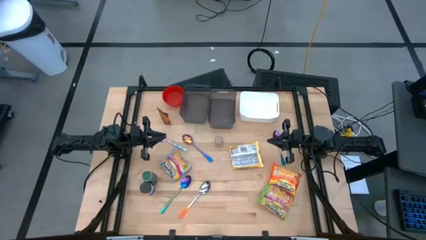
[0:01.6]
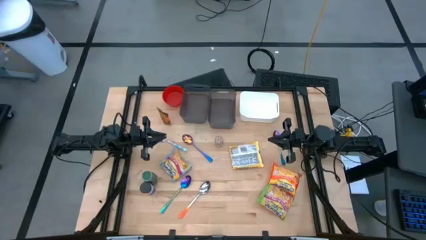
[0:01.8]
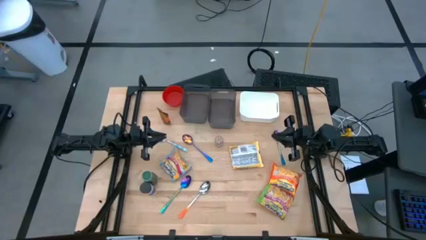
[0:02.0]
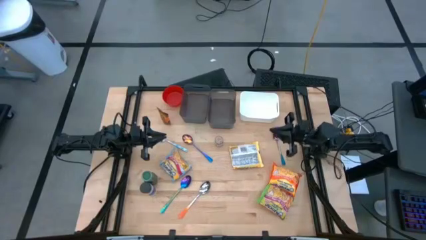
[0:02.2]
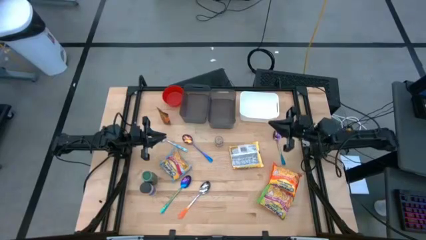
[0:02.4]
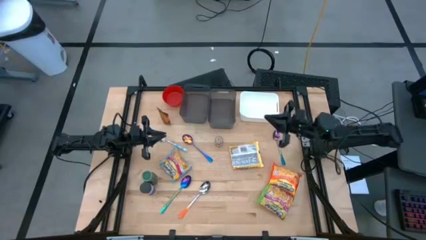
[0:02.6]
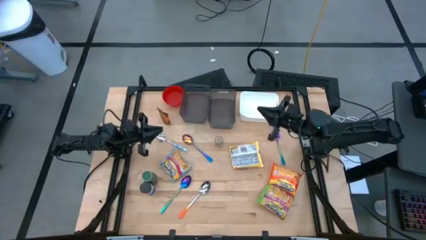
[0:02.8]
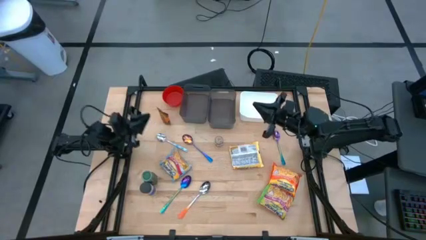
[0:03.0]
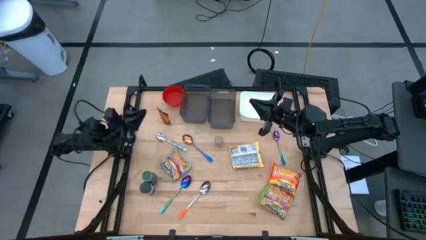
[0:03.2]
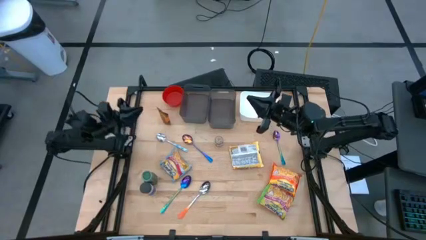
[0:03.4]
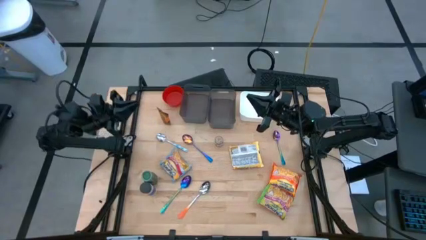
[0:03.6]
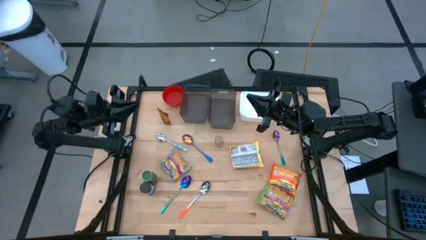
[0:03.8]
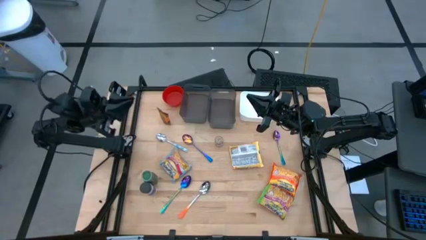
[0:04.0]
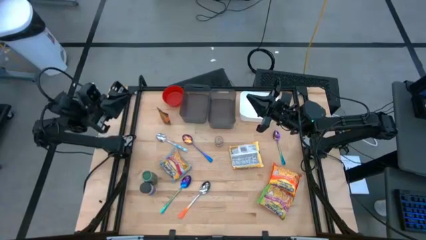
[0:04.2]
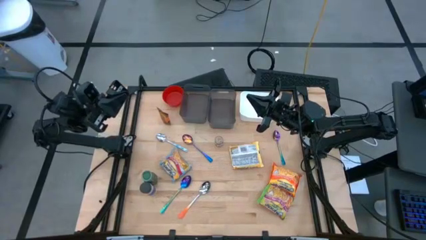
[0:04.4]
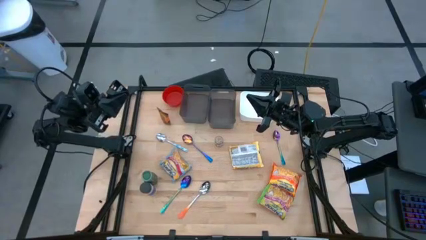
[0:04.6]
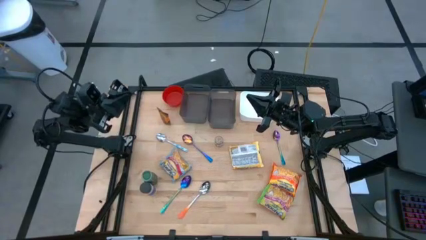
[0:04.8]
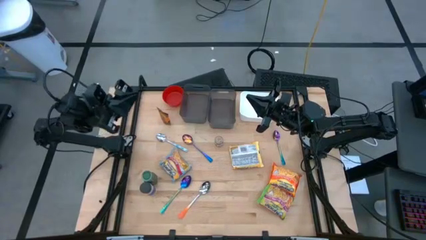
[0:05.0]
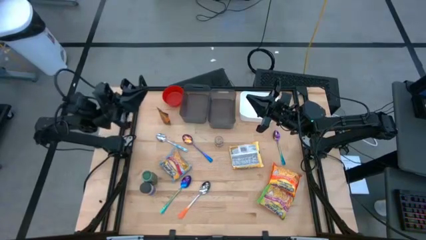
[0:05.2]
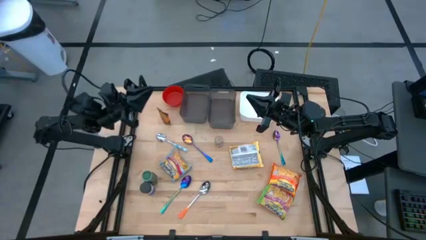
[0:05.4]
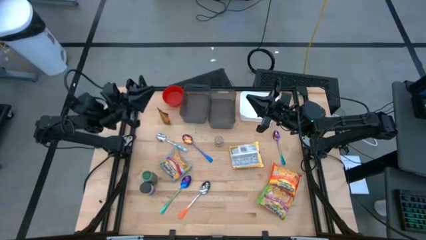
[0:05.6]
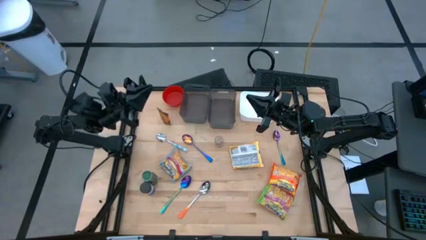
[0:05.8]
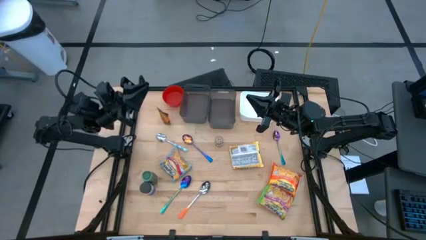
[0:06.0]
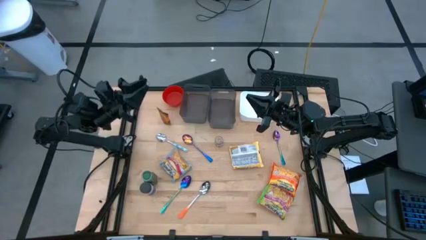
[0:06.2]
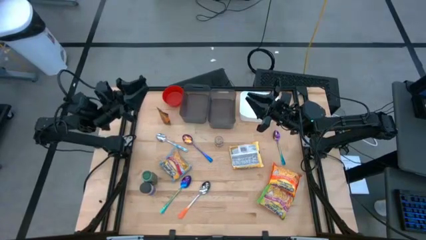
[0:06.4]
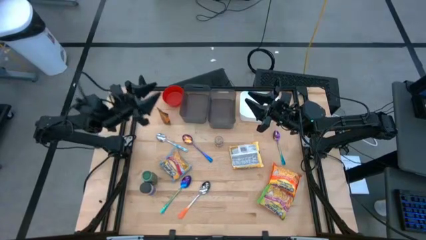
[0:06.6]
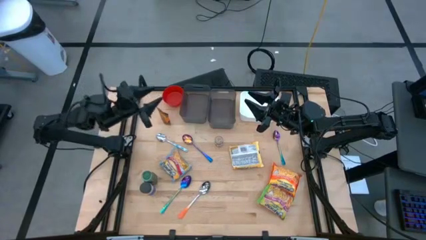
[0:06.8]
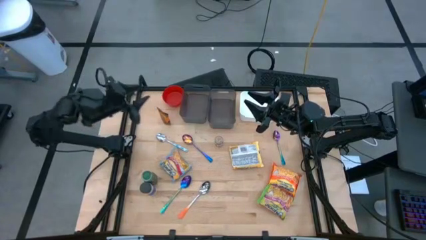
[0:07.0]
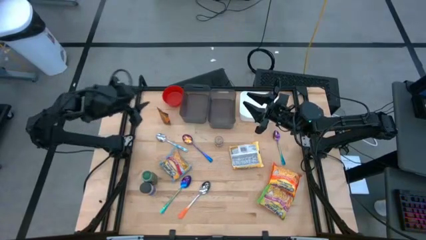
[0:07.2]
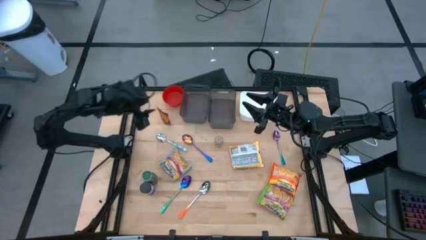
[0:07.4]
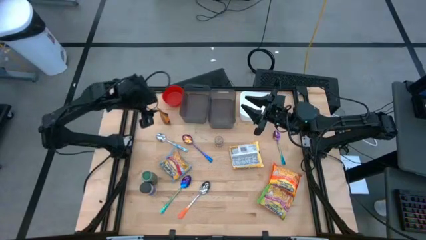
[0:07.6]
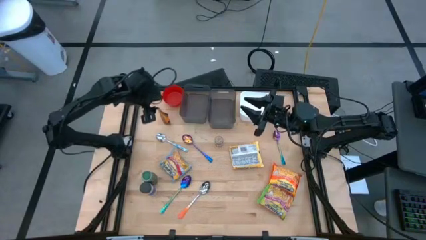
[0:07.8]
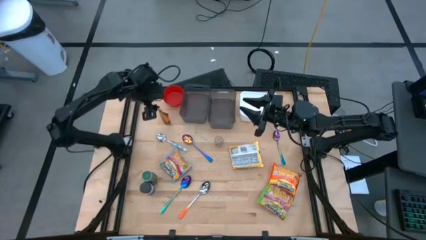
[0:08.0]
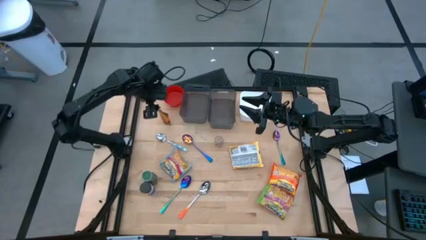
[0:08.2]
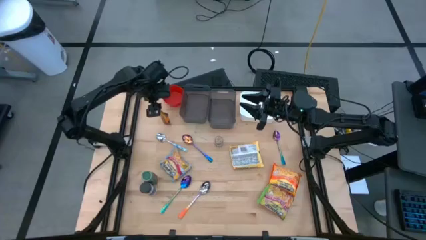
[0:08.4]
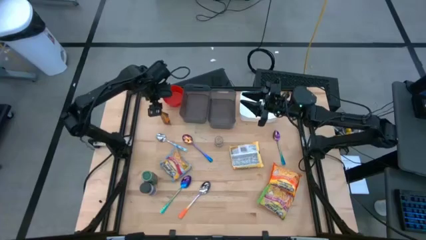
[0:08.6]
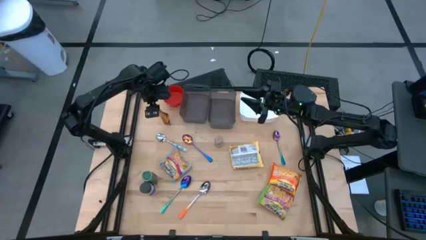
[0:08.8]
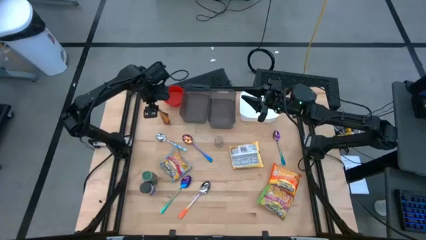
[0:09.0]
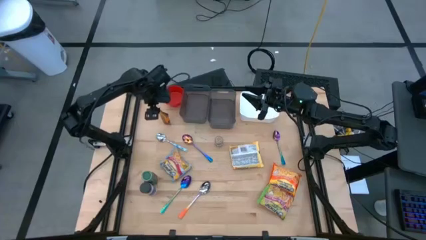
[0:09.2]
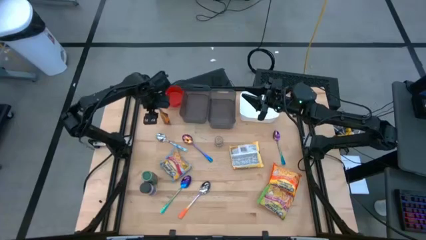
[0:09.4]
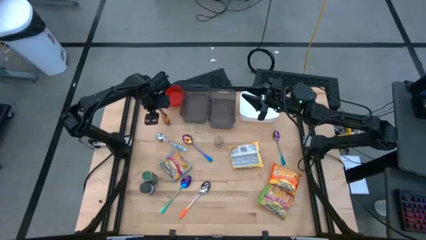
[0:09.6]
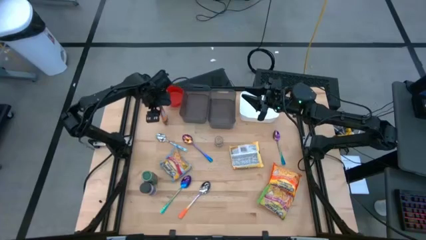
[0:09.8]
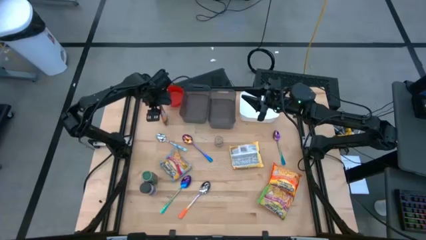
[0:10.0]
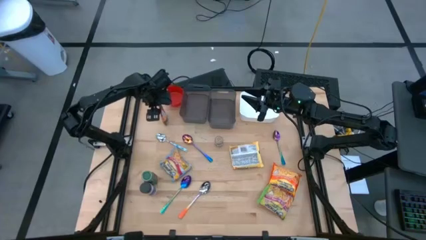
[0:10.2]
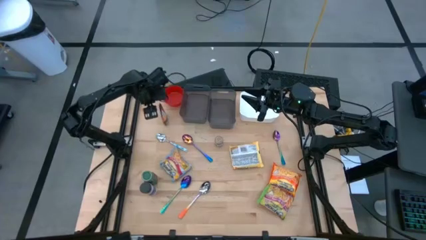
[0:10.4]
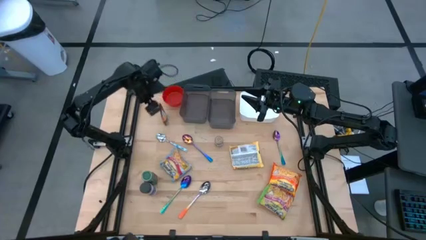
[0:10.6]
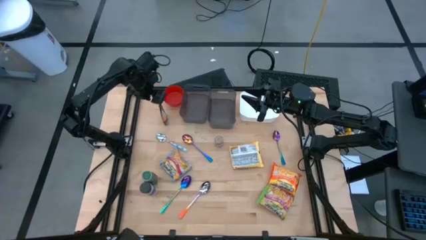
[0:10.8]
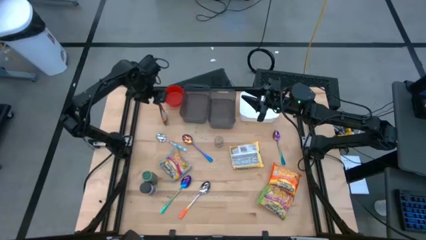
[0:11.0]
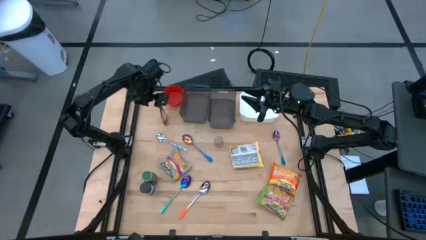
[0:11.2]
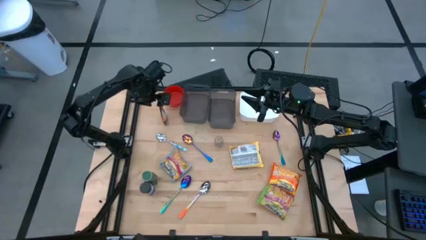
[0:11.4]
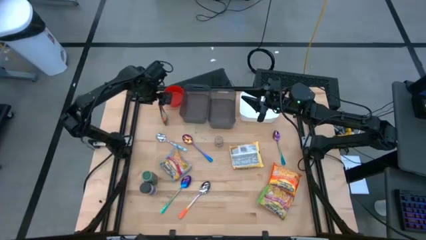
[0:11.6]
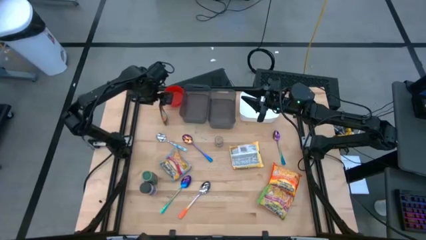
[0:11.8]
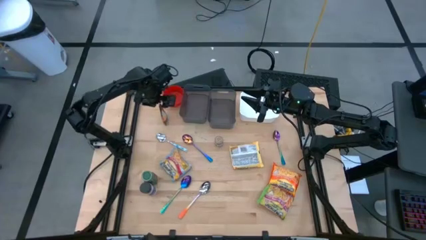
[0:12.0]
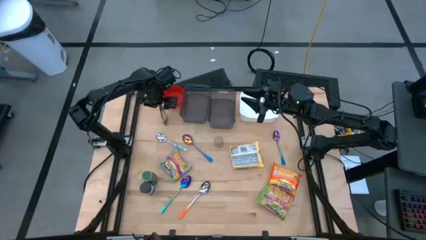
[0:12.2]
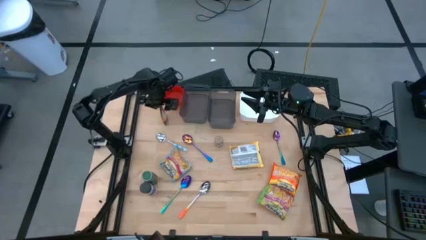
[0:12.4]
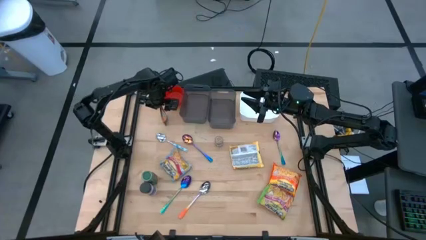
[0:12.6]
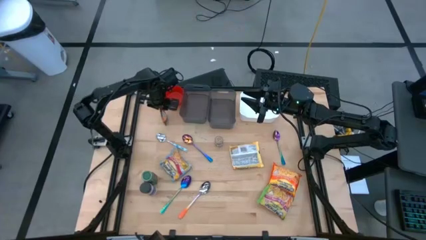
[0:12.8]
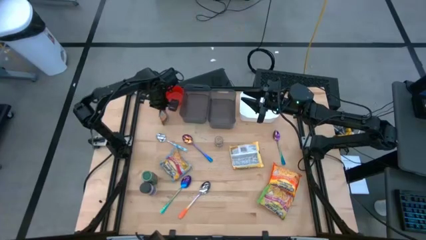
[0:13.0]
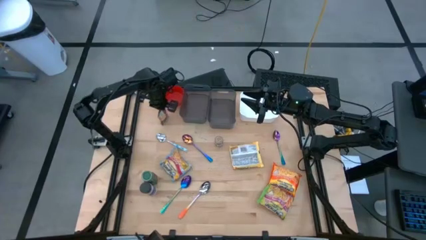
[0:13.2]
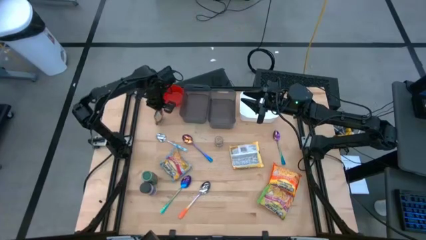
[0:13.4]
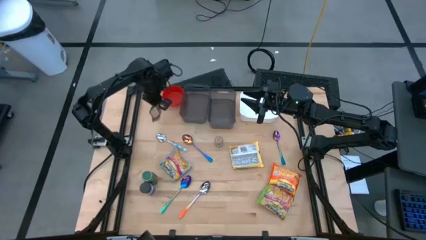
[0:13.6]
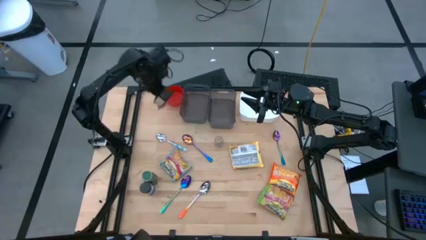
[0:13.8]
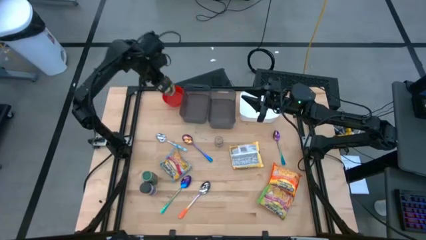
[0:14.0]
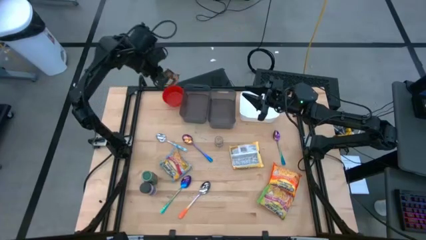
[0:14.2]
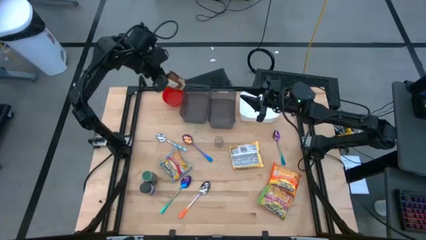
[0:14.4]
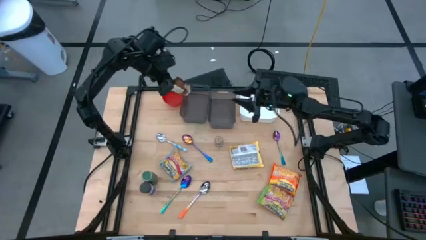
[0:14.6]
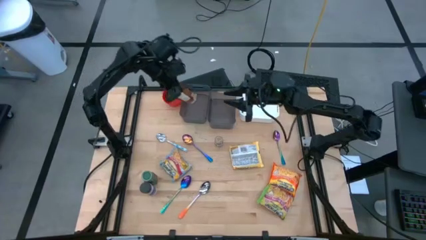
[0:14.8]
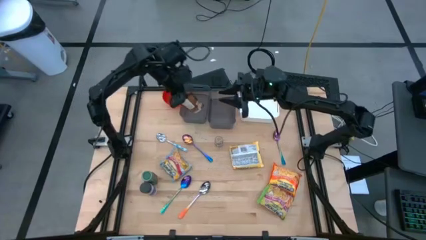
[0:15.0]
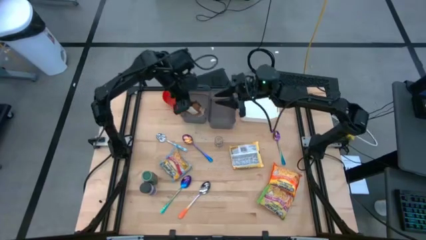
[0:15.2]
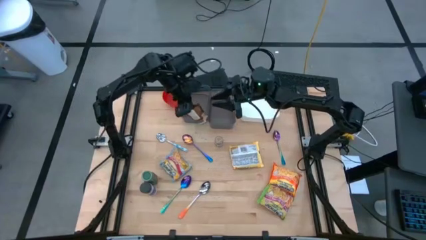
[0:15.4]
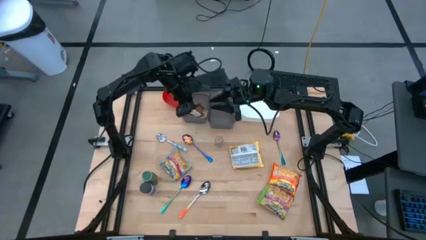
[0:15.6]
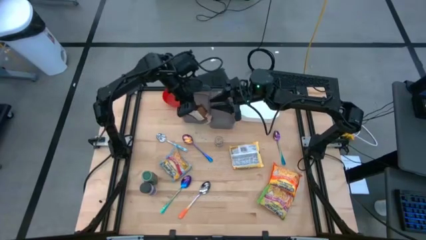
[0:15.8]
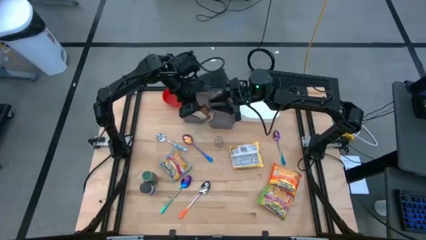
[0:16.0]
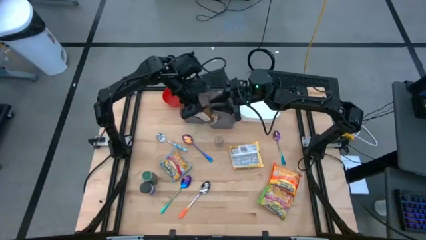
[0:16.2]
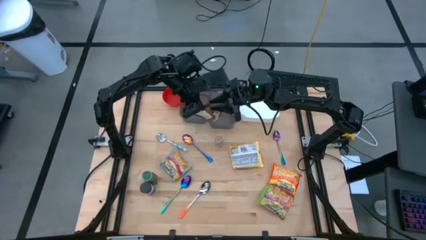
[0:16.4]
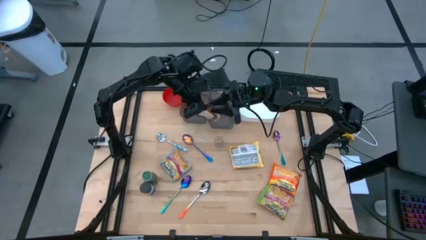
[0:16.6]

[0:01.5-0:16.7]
Task: Pick & Place Food Item
Put the orange seasoning pack into the white bin
